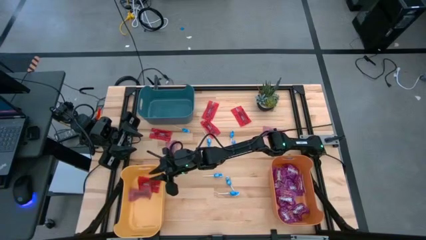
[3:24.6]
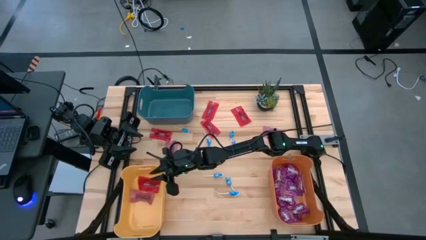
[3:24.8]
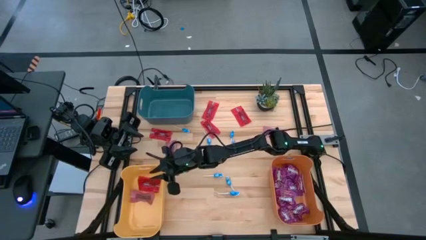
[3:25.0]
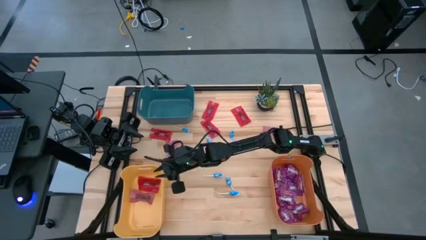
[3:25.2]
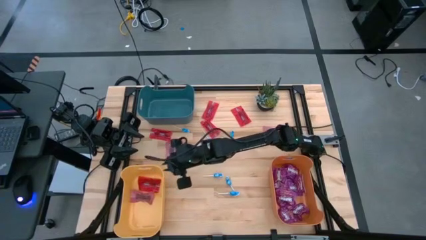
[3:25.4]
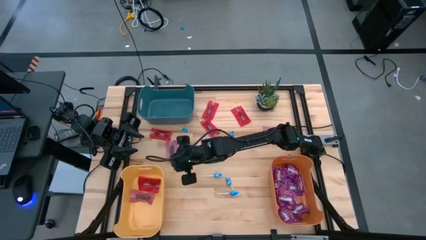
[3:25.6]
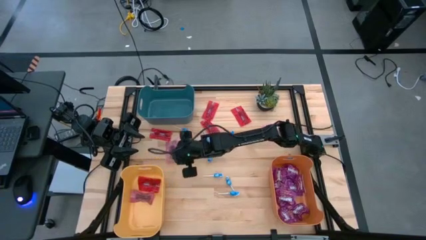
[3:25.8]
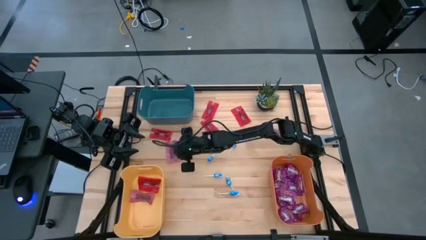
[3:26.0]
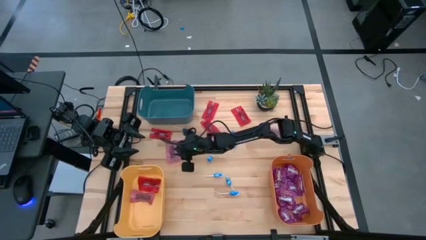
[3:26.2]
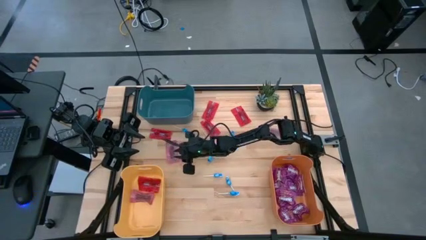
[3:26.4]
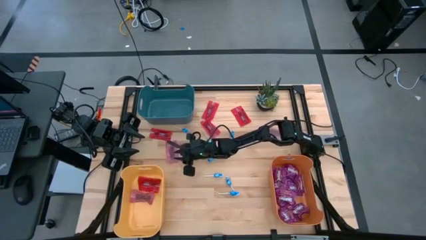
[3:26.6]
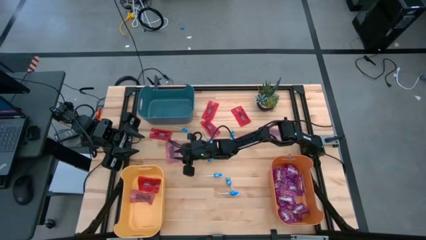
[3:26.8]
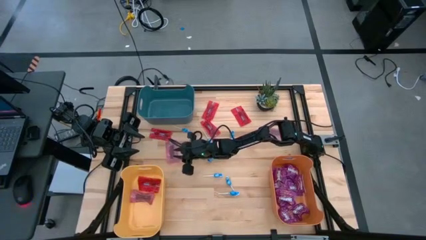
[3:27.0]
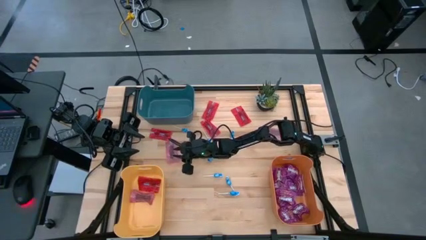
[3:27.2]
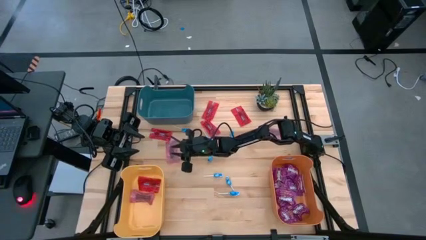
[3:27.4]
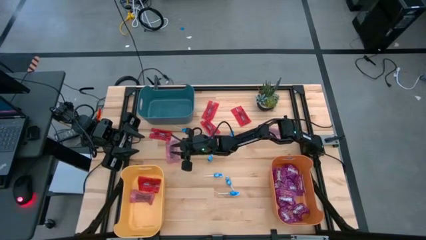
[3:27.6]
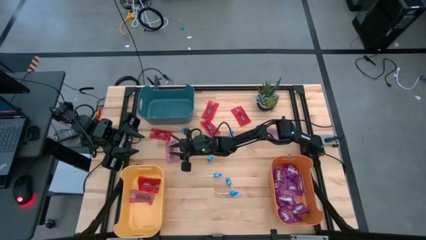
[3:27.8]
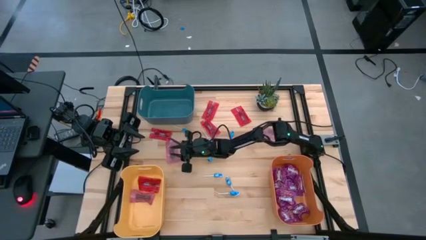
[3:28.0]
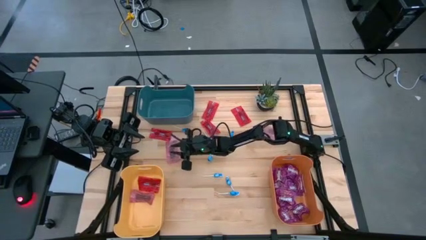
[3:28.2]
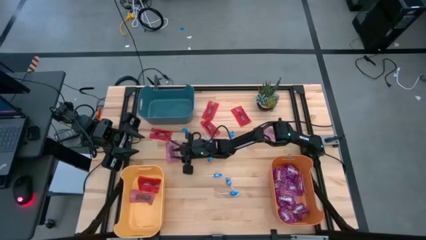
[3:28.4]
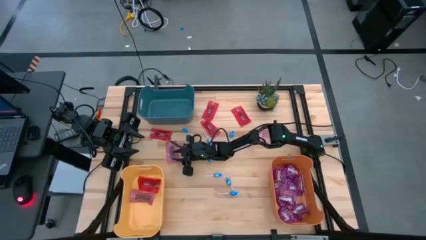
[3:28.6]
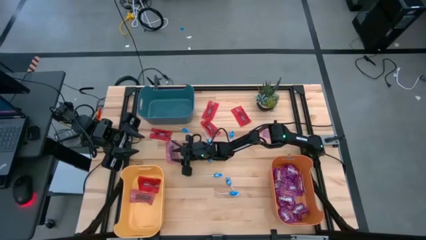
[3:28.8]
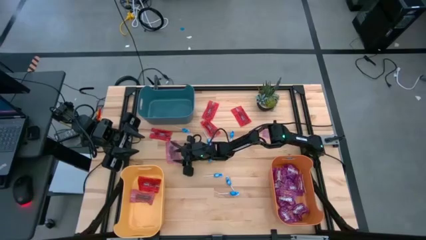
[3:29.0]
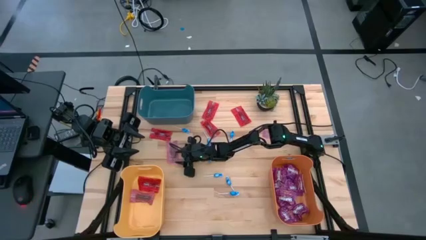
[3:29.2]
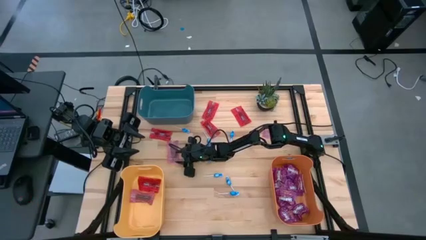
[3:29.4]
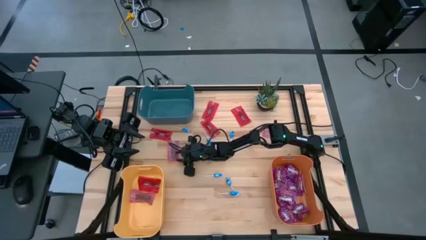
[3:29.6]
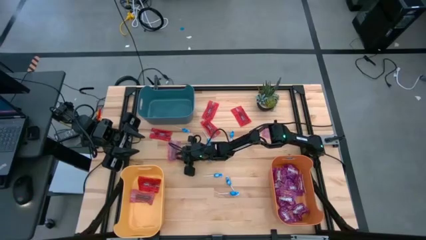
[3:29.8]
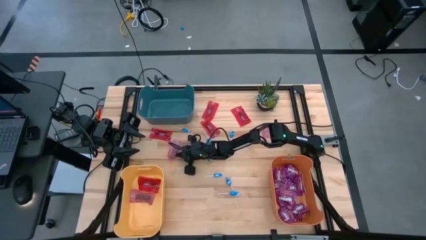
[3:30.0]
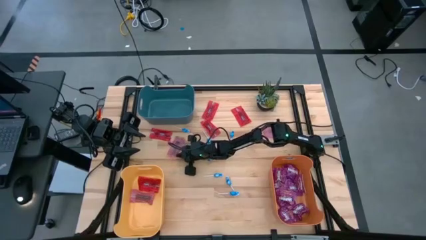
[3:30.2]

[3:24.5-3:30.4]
Task: Sort candy
Put the red candy into the yellow bin

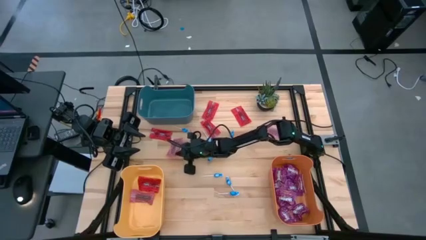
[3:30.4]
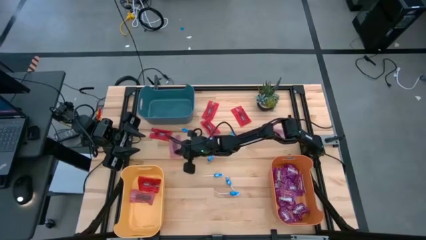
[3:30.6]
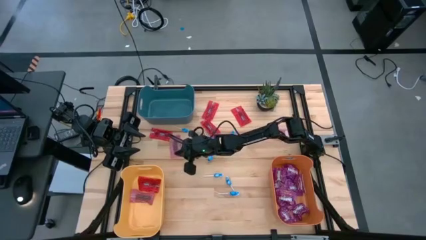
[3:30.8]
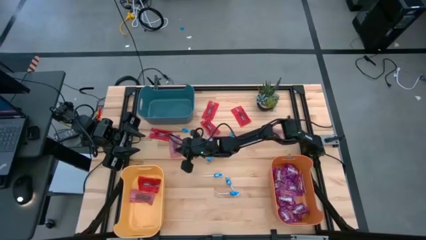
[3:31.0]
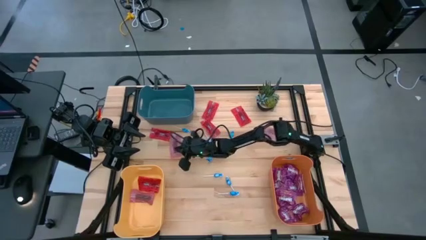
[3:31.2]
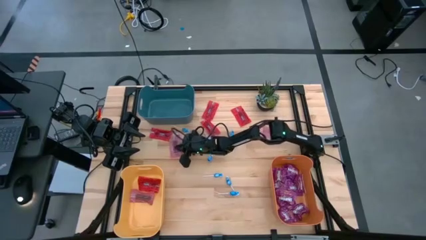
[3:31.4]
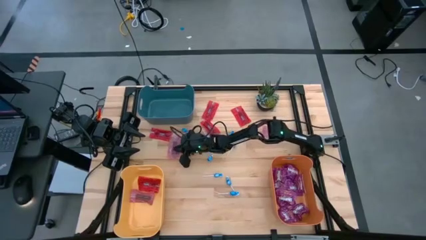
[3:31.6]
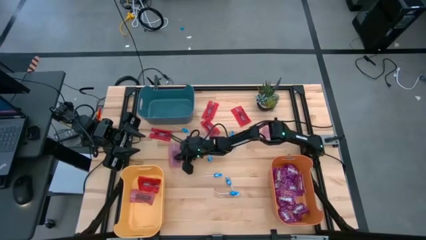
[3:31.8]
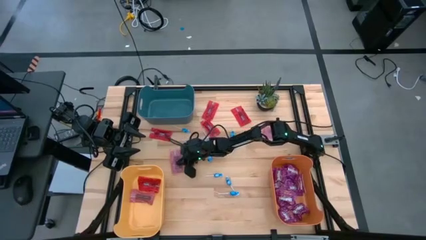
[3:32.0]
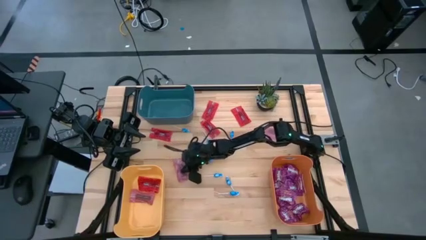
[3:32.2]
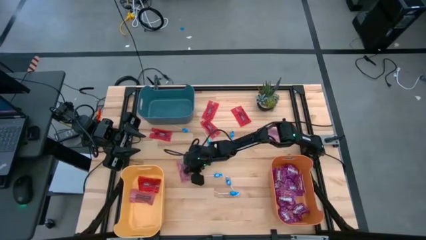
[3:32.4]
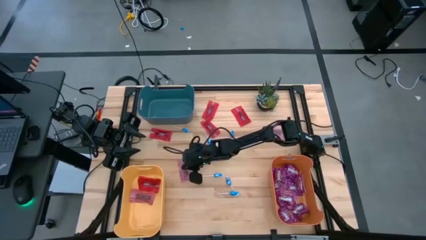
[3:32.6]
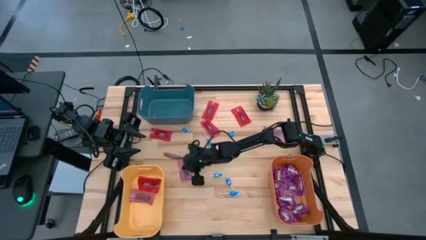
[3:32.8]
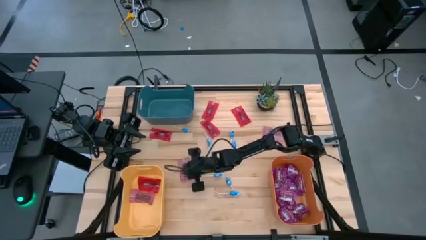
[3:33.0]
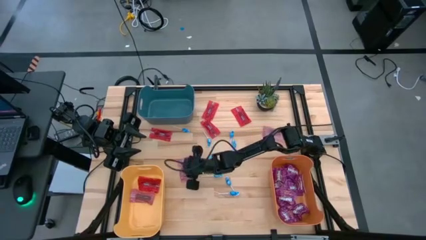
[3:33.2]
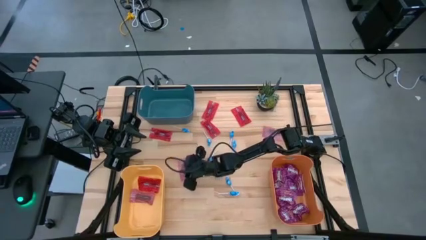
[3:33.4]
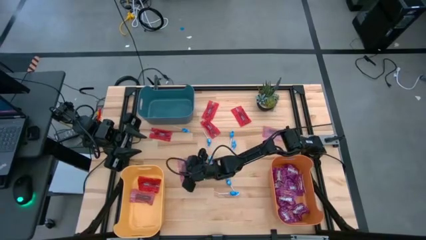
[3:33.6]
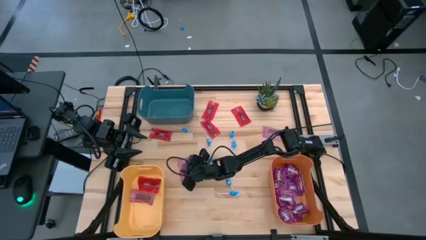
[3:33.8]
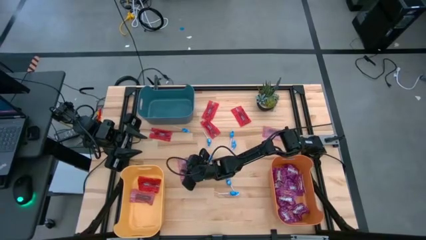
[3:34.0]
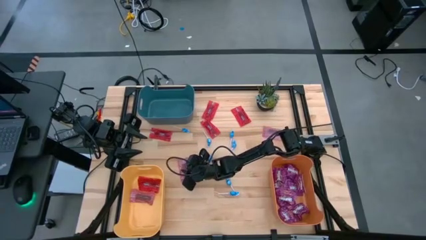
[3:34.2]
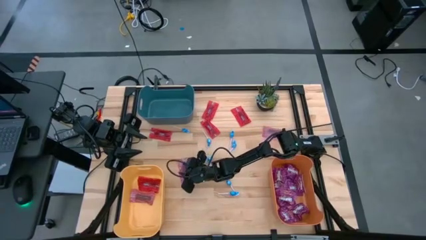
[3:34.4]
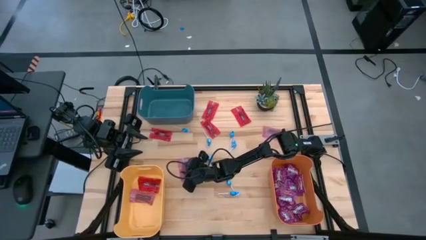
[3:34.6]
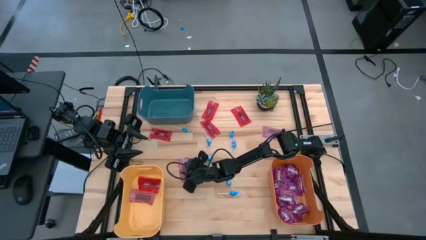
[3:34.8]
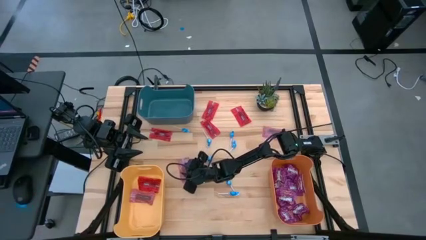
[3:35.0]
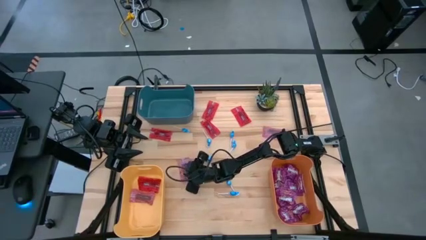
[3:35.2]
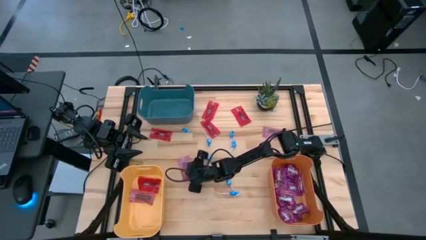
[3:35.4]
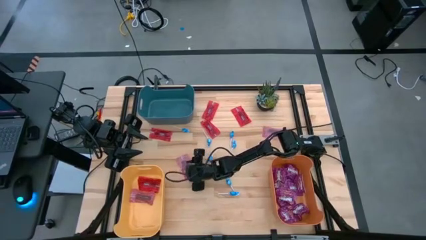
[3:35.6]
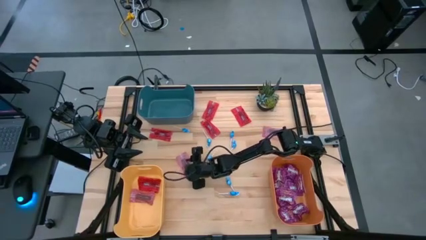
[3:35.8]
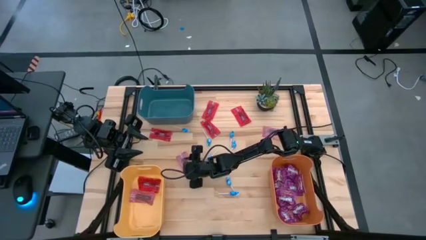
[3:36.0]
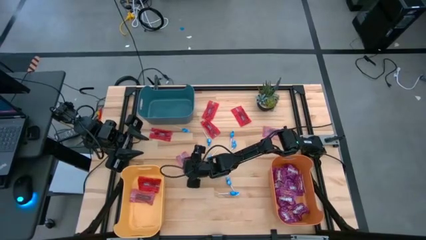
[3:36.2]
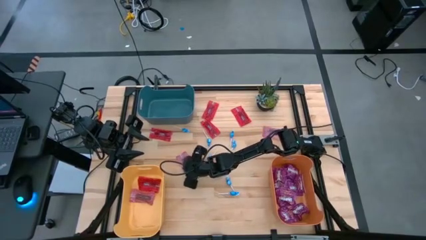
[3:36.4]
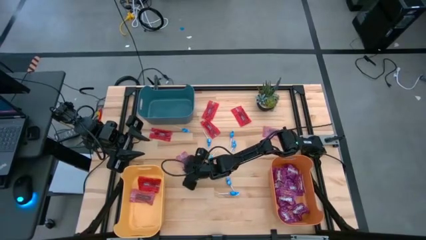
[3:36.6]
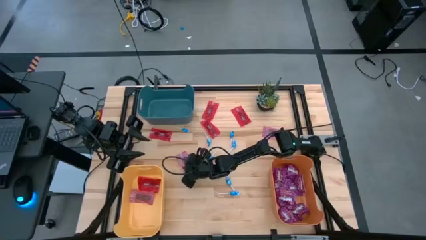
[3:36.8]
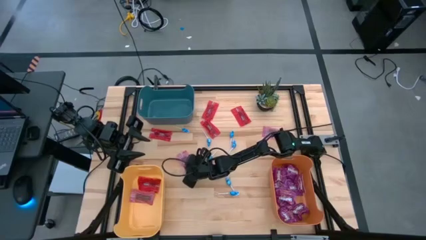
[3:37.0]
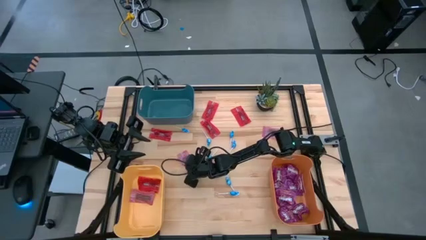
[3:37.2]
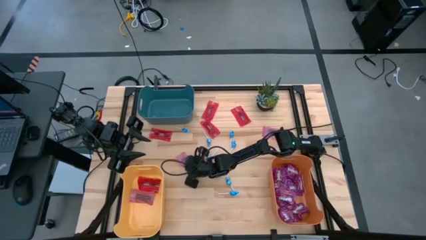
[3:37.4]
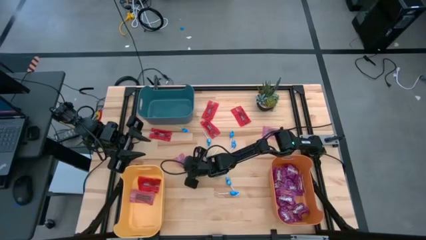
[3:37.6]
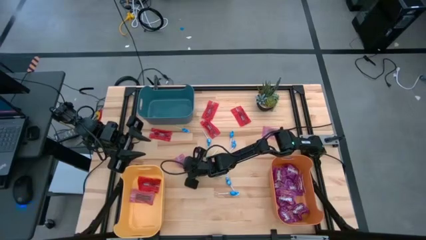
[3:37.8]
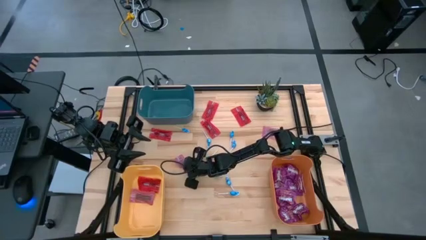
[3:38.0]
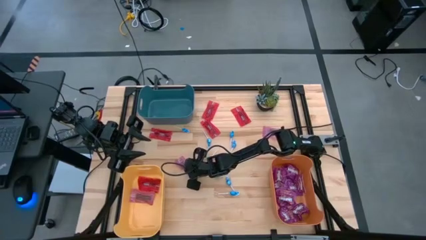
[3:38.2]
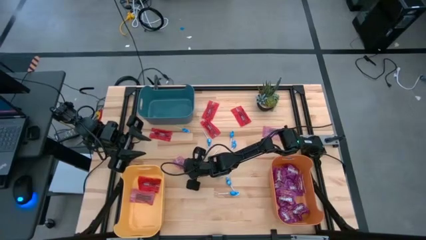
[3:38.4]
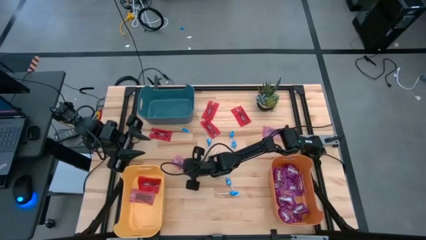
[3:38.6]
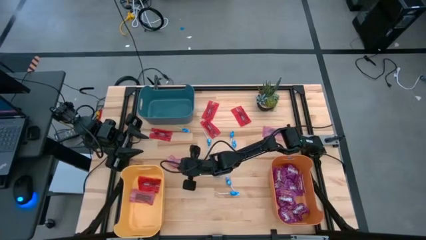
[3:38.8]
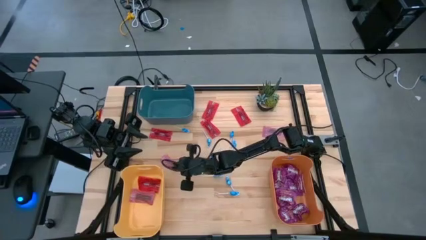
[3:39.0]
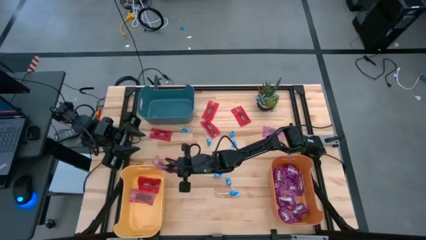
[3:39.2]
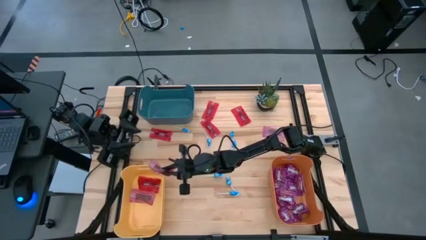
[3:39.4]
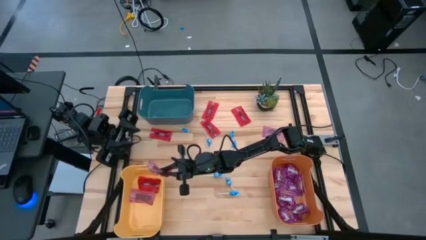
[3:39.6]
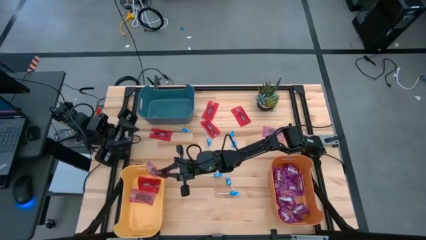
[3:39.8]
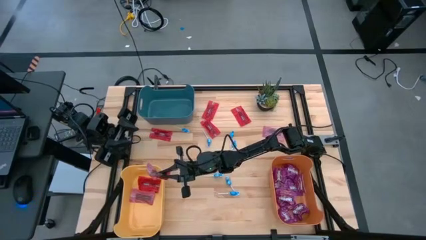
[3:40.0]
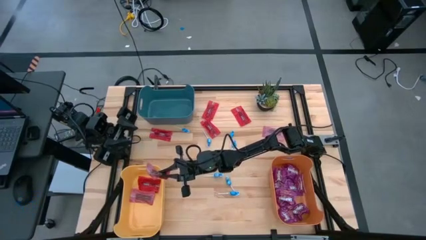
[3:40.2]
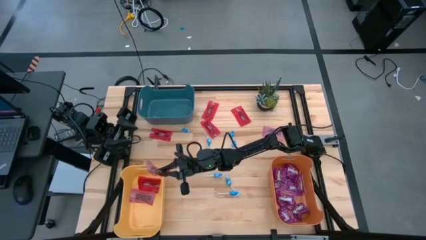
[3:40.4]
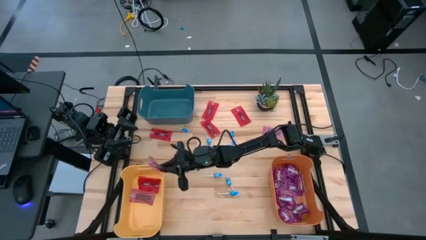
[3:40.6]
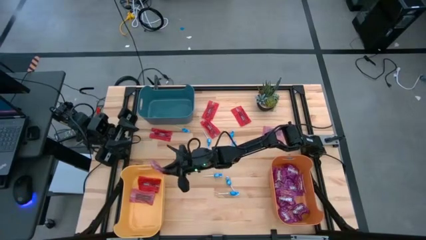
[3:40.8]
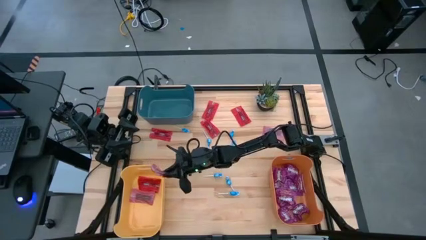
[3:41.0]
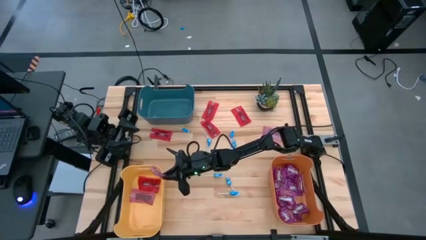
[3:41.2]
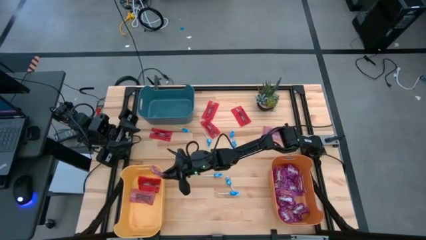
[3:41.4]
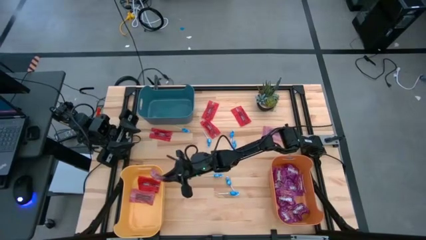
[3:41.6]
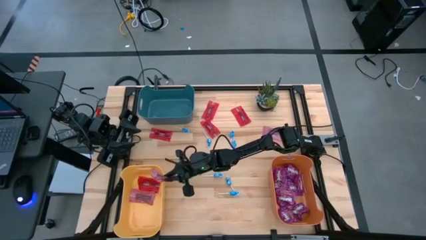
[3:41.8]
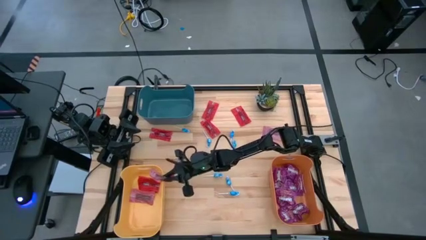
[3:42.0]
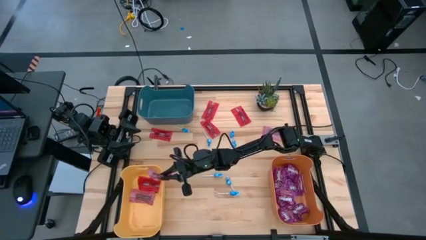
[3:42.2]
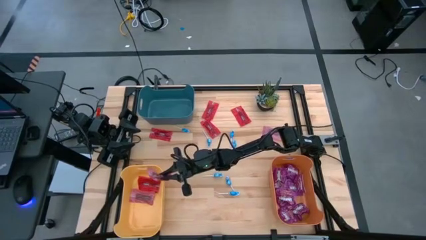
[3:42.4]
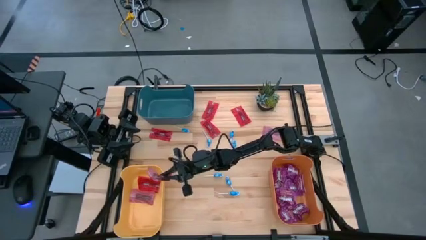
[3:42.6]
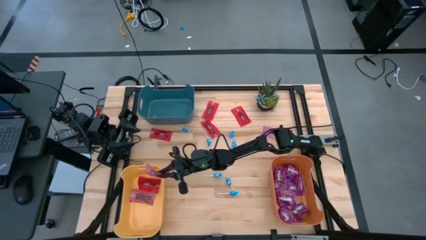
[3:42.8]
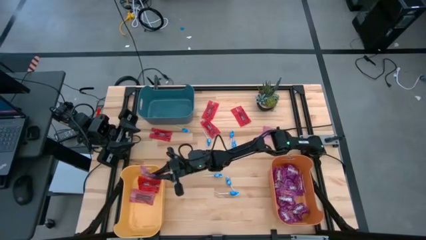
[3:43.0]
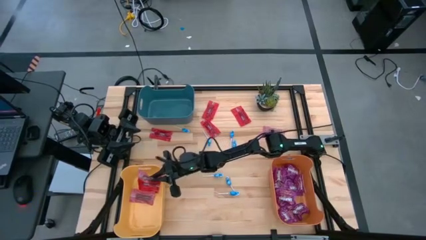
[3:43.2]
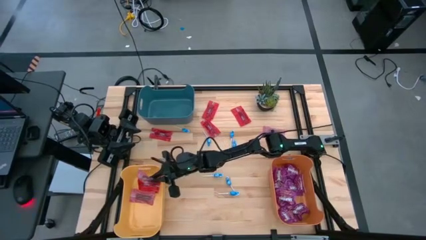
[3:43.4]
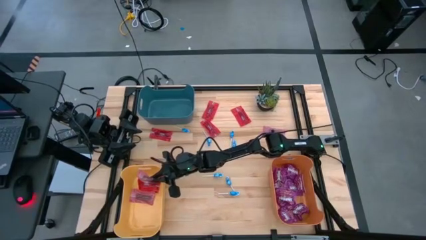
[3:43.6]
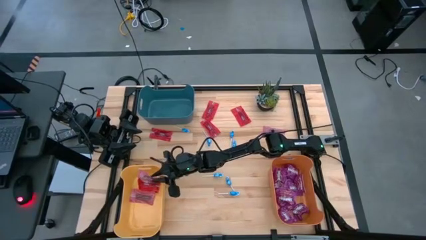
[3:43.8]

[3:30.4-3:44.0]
Put the red candy into the yellow bin
